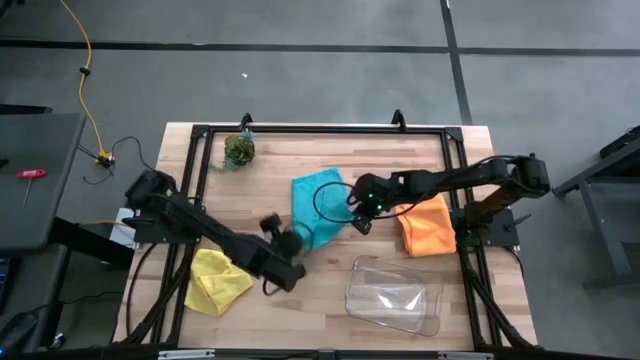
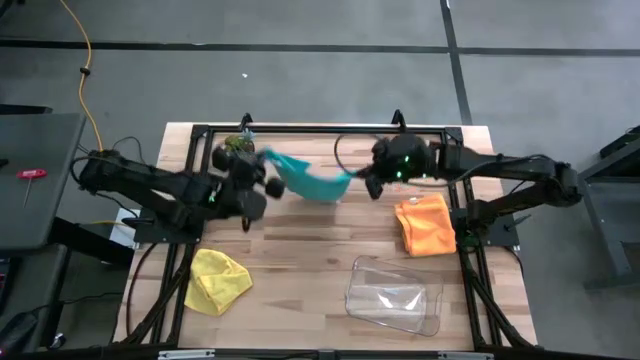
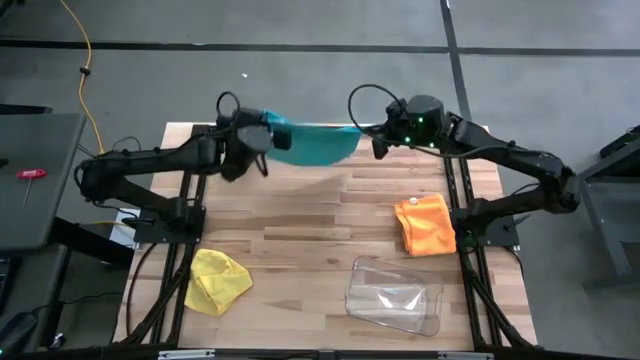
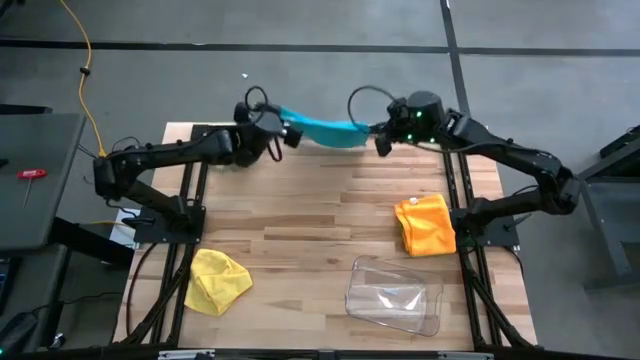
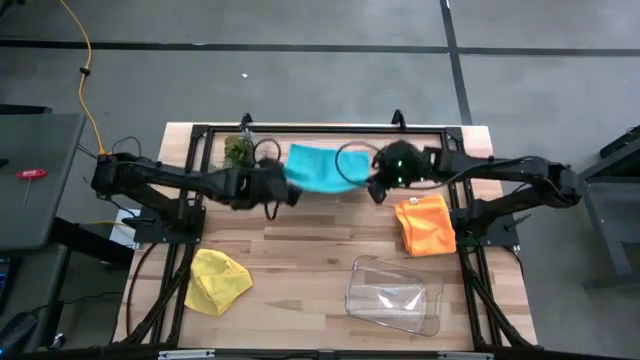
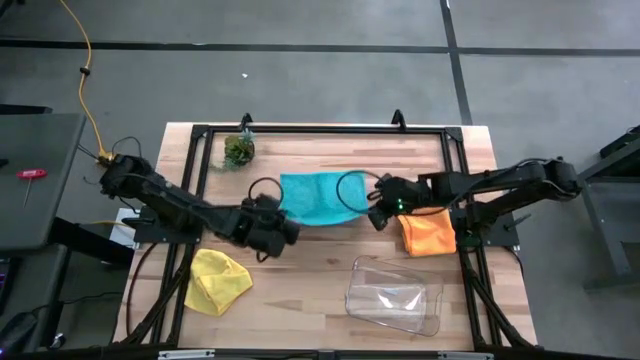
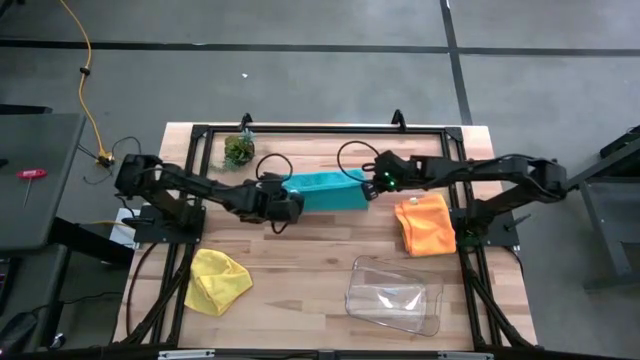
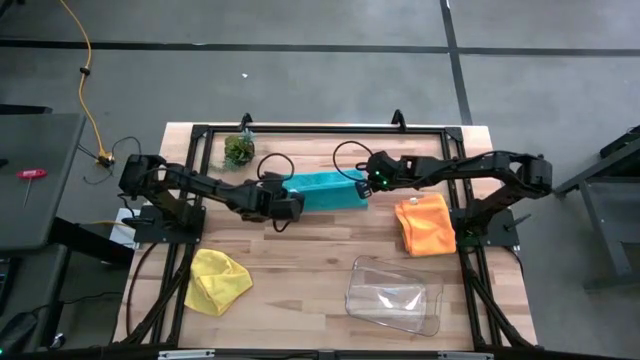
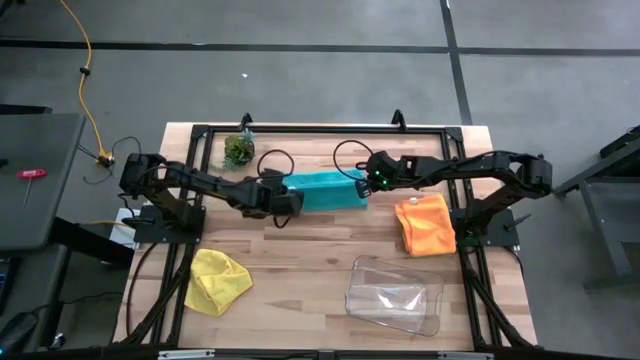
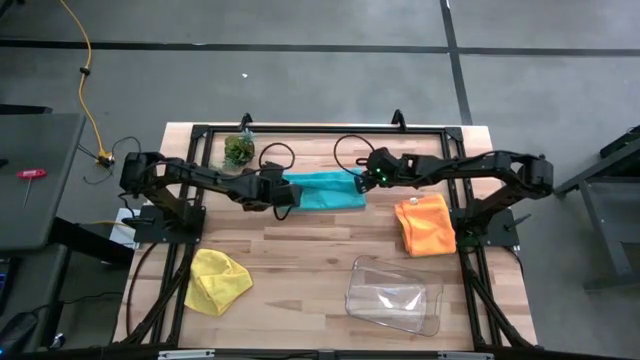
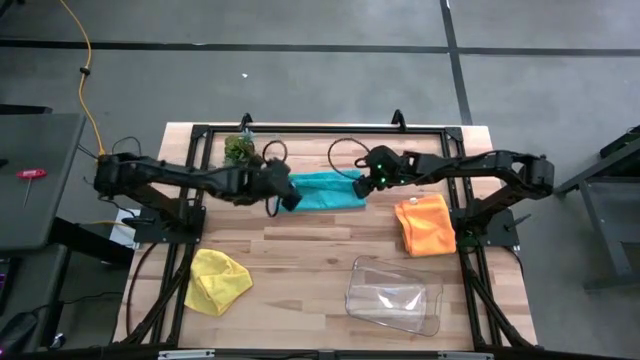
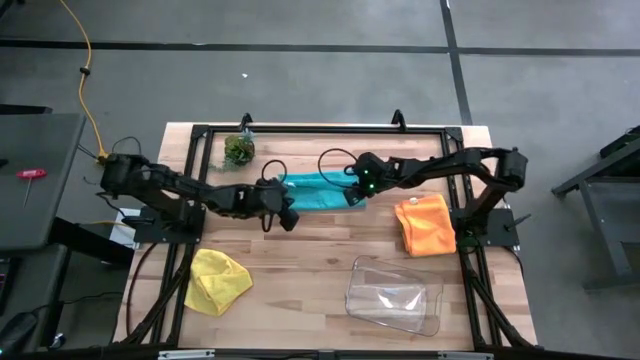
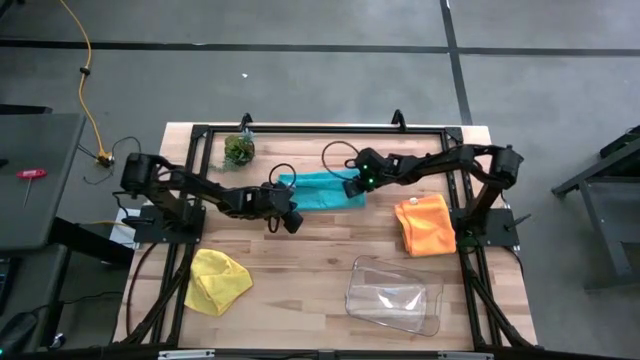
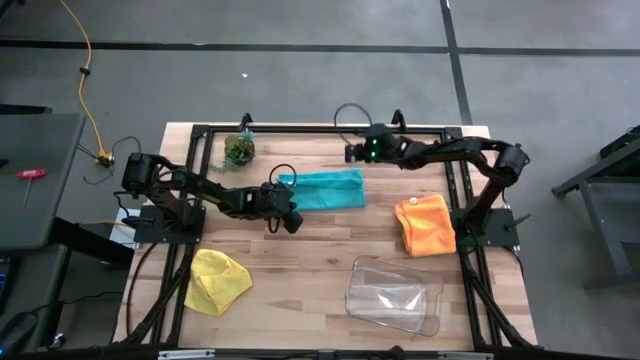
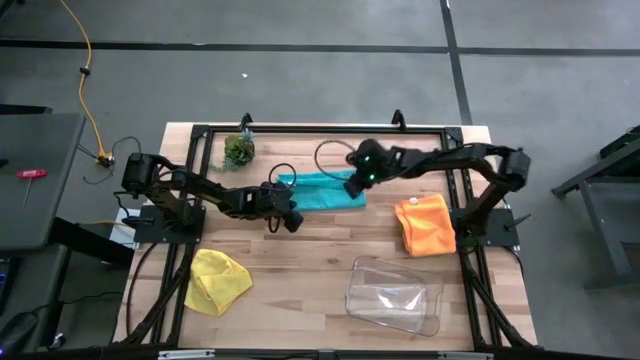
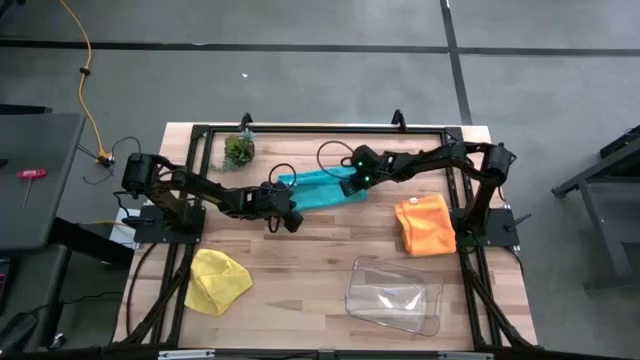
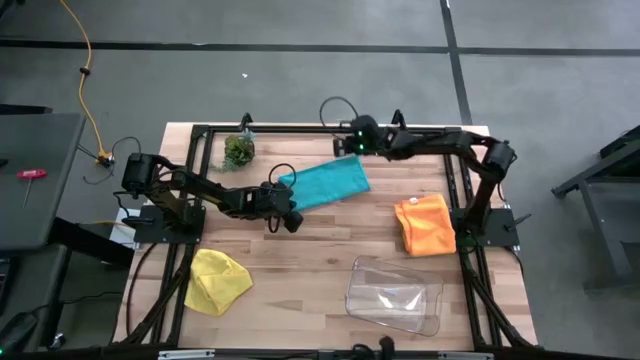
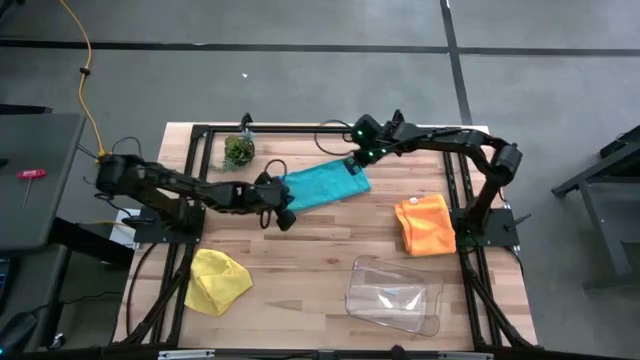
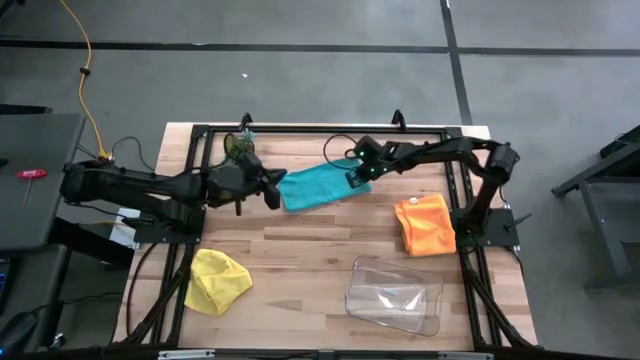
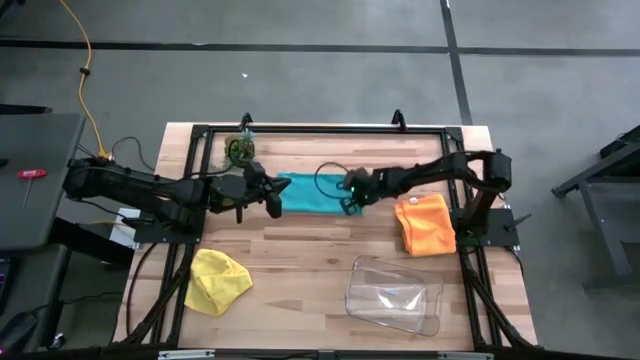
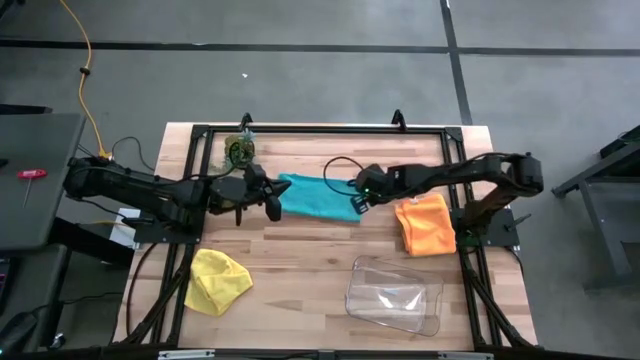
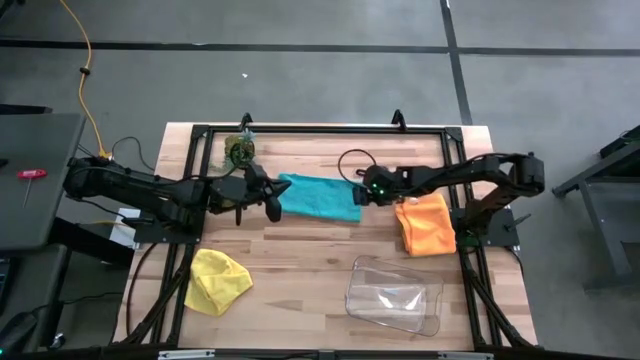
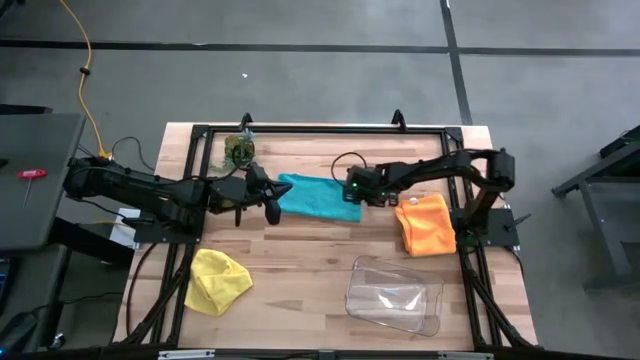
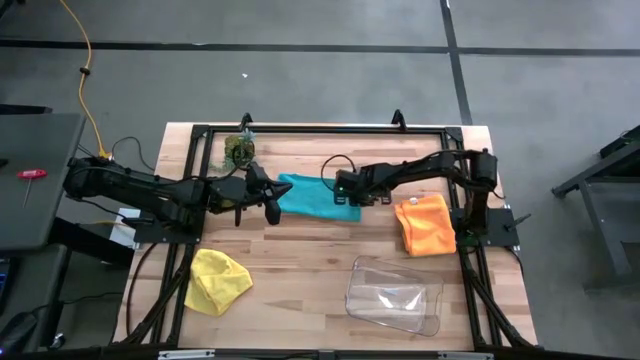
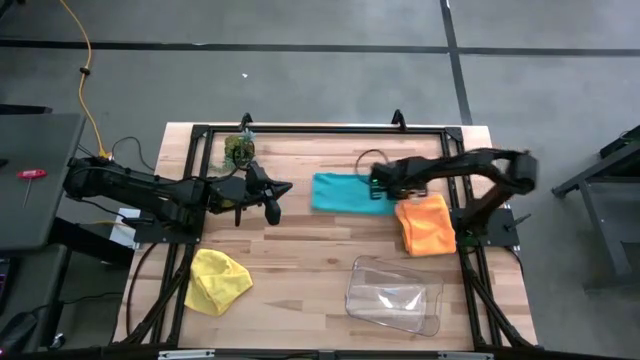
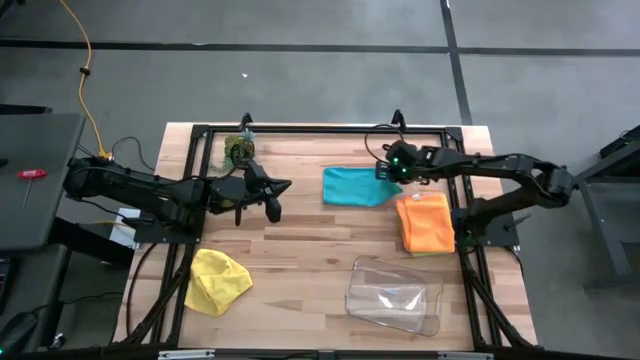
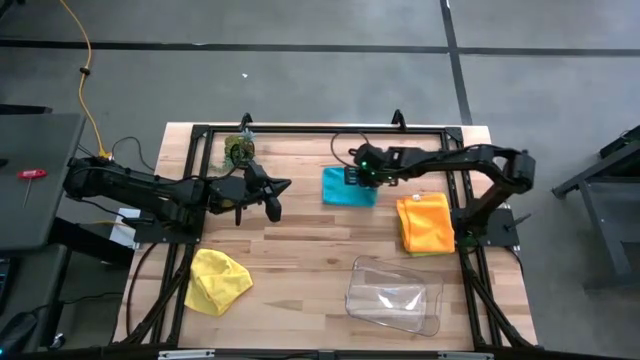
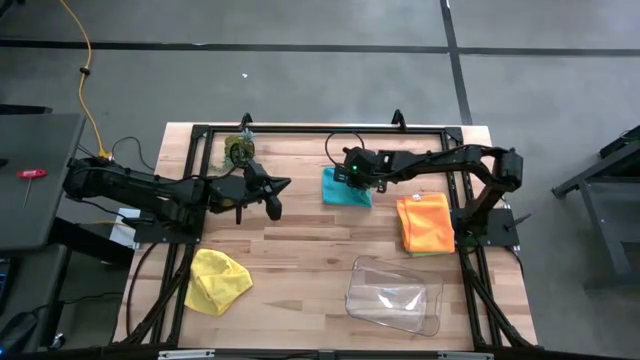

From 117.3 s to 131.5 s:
Task: Fold microfiber towels
Fold the blue cloth

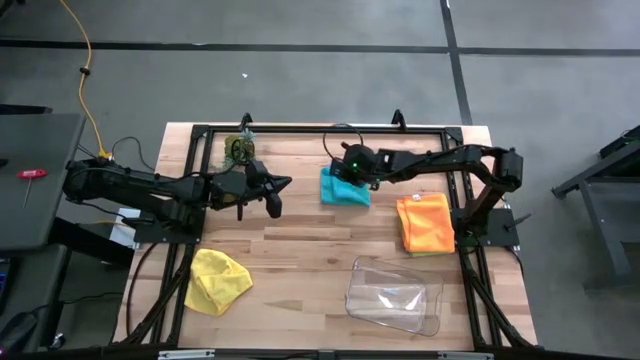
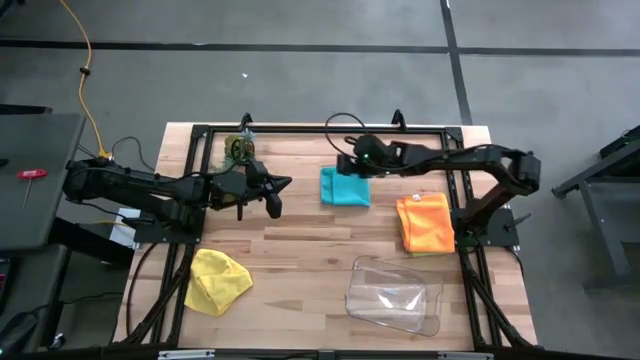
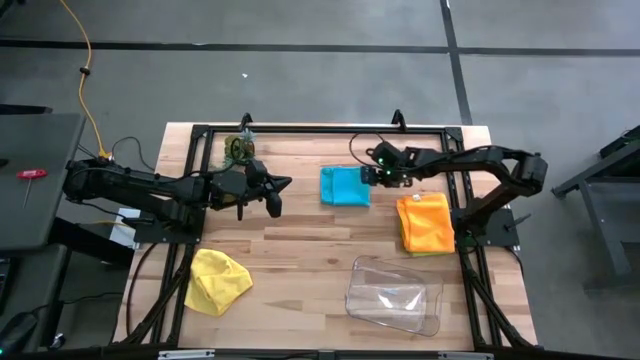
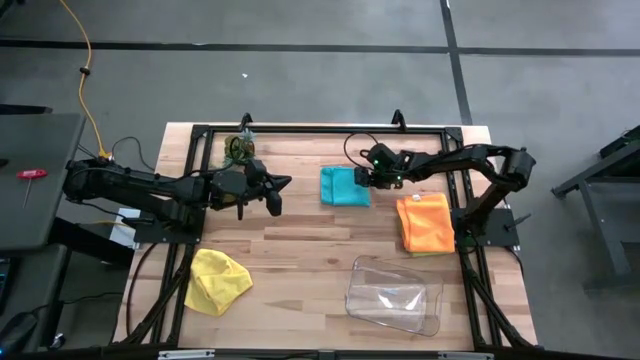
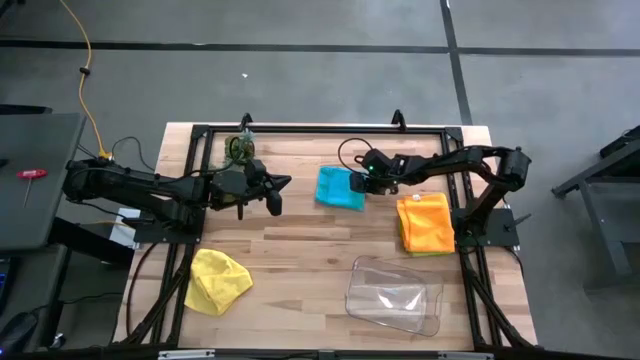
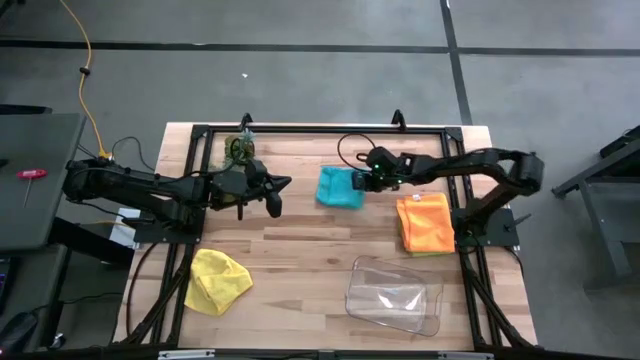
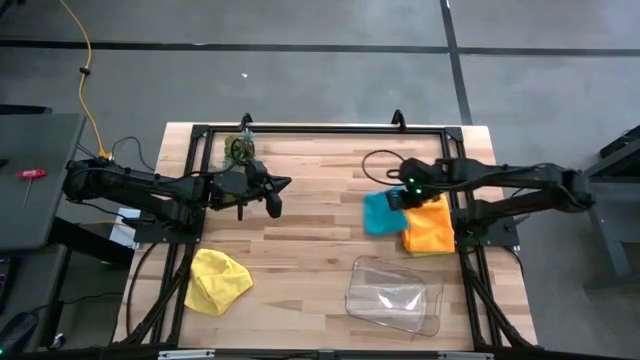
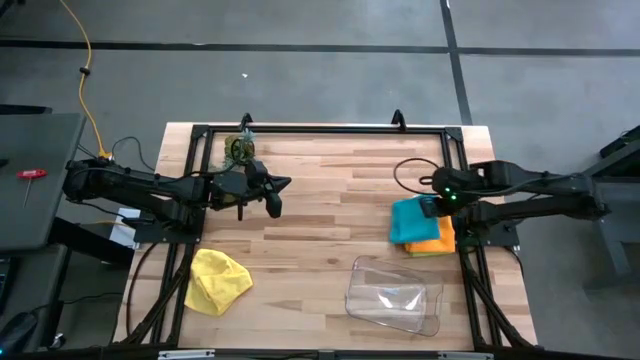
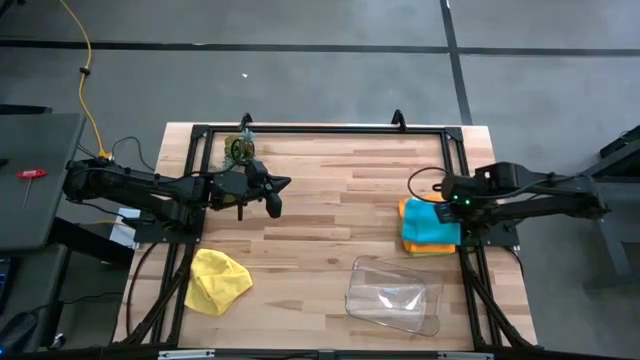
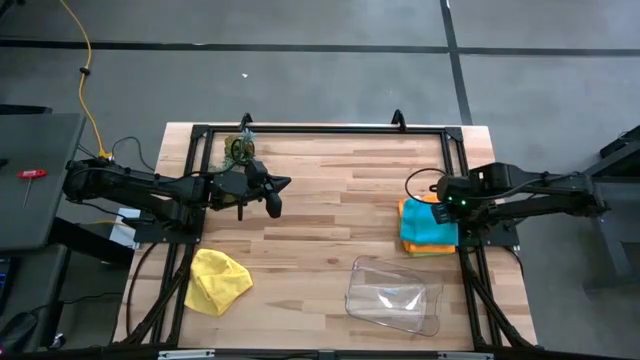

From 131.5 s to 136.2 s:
Stack the blue cloth on the orange cloth

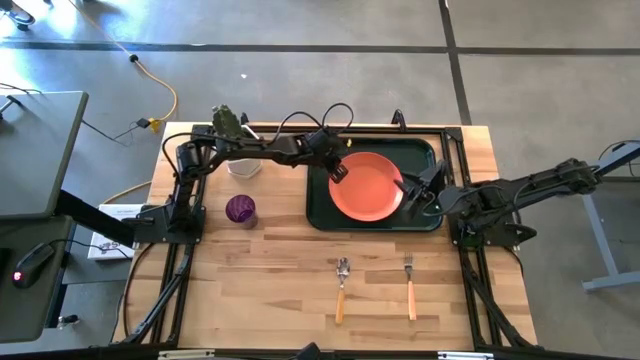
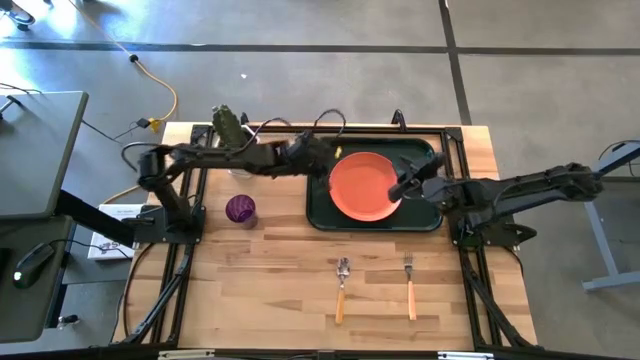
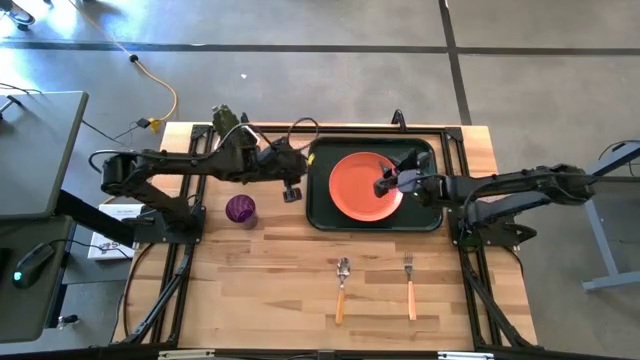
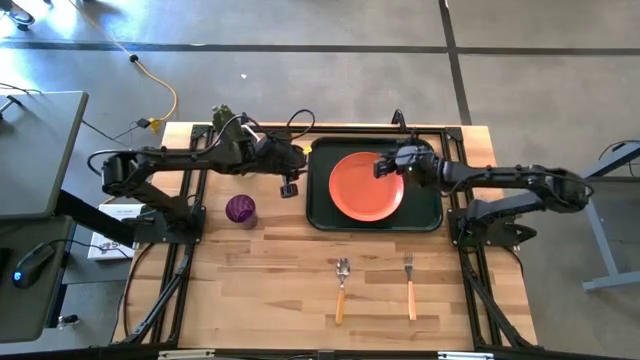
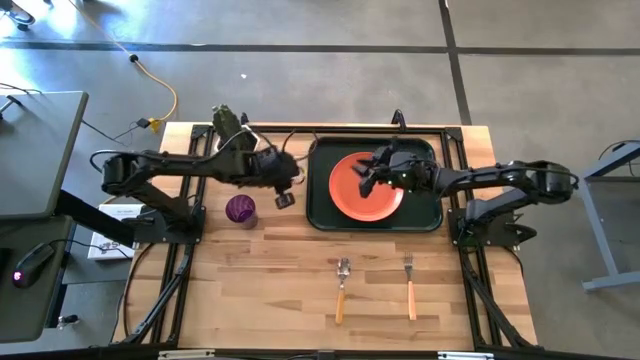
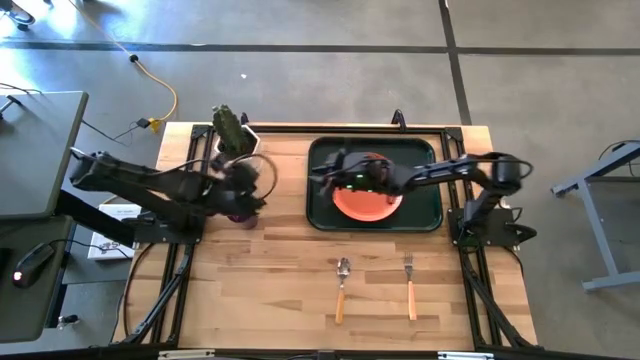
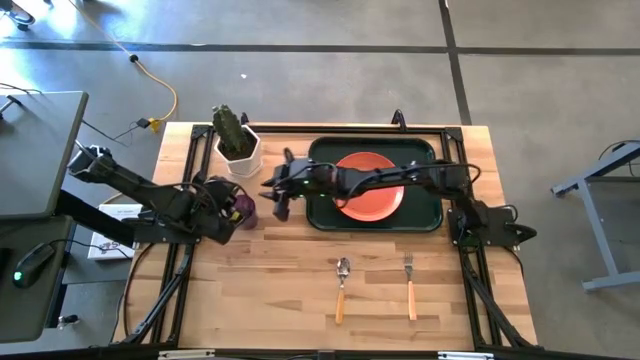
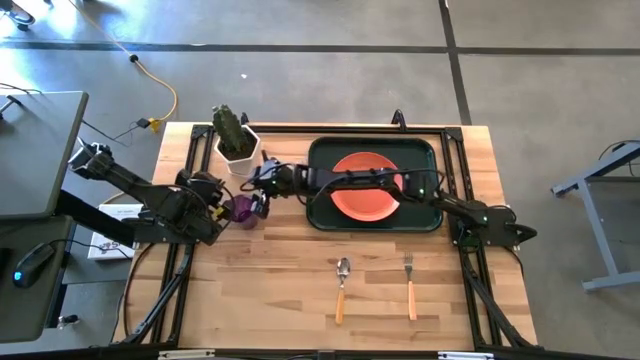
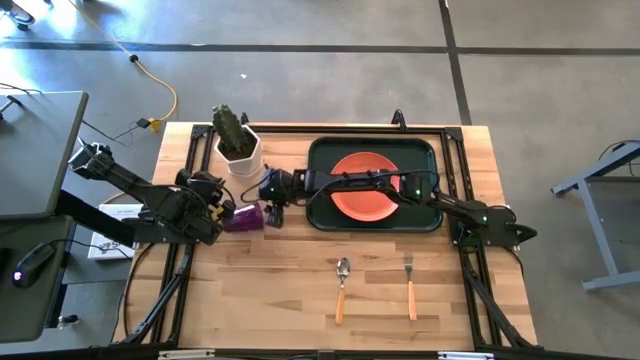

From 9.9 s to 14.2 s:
Task: Pick and place plate/cup/fork/spoon on tray
Put the violet cup on the black tray to the top left of the orange plate
